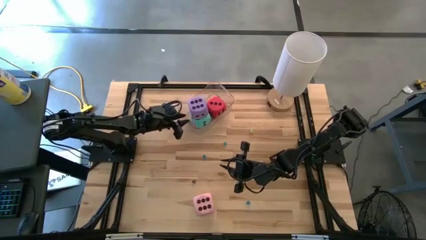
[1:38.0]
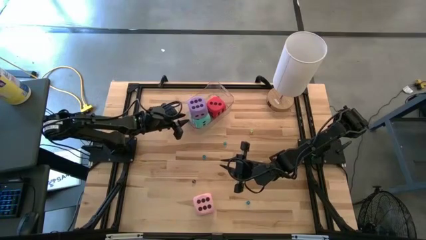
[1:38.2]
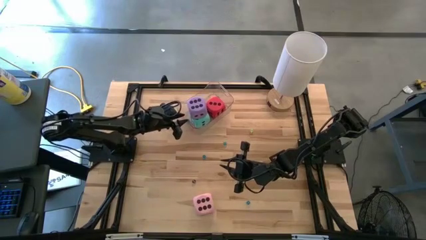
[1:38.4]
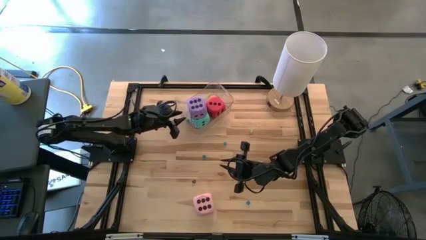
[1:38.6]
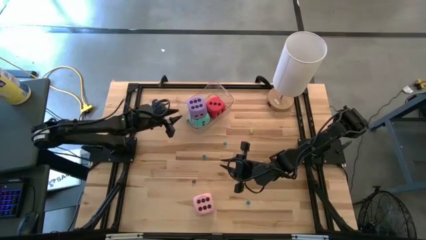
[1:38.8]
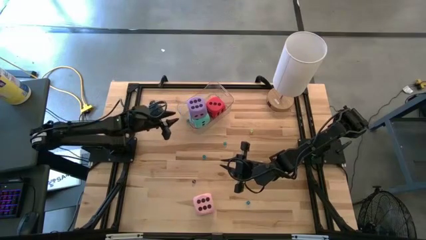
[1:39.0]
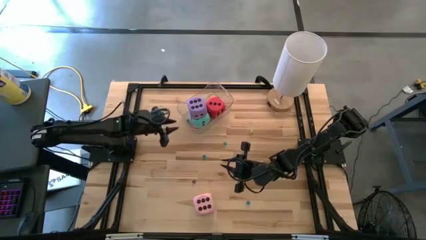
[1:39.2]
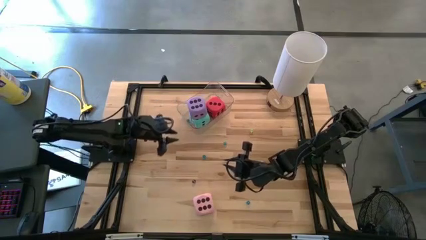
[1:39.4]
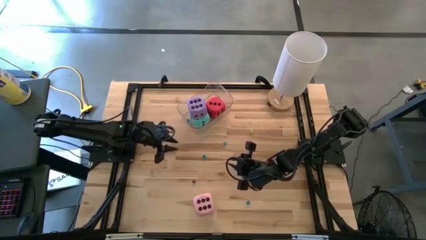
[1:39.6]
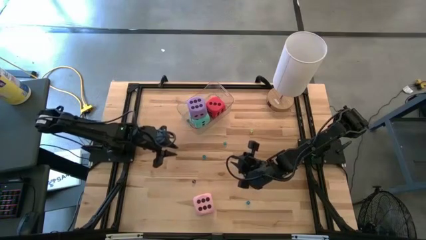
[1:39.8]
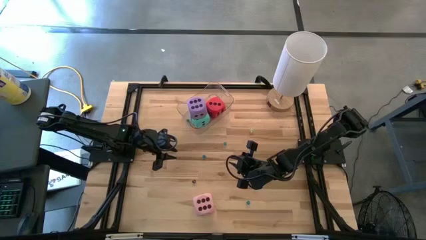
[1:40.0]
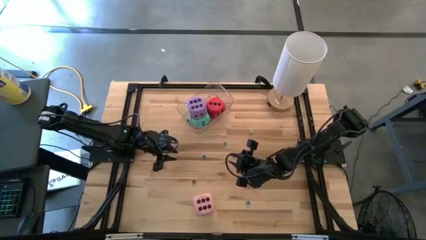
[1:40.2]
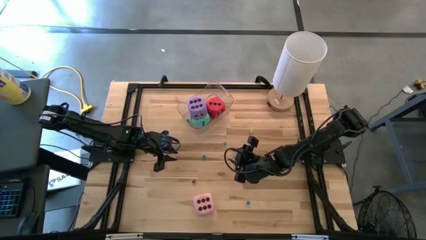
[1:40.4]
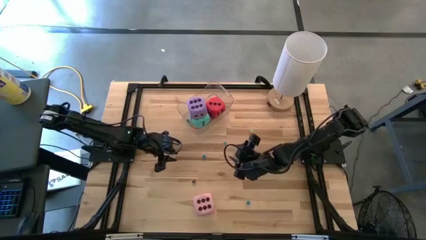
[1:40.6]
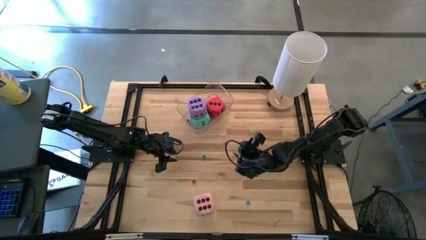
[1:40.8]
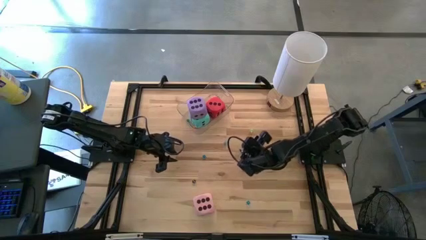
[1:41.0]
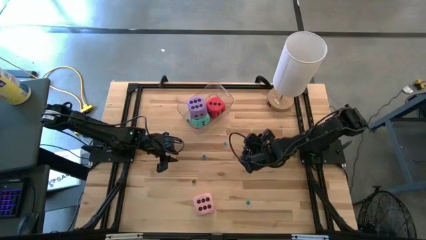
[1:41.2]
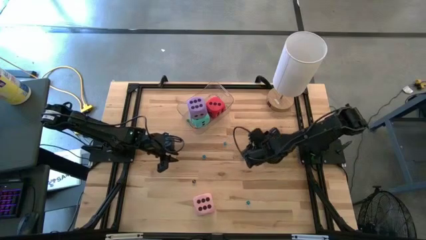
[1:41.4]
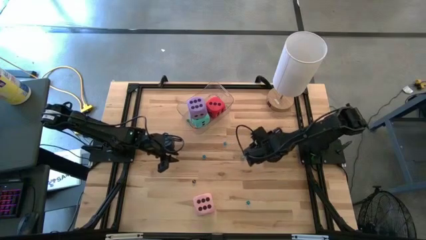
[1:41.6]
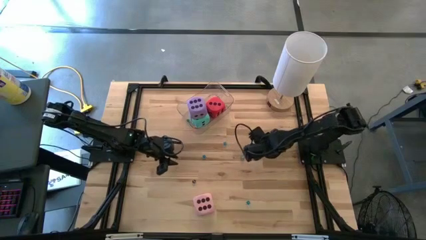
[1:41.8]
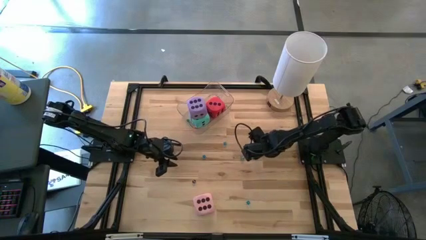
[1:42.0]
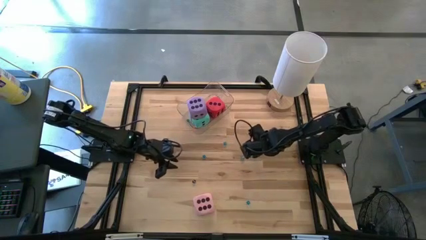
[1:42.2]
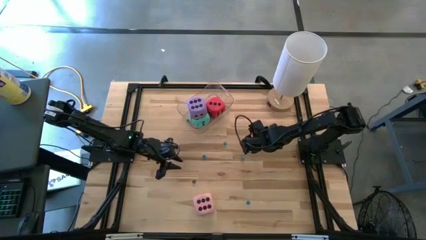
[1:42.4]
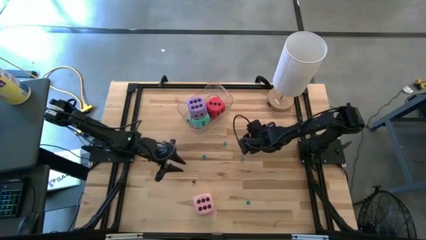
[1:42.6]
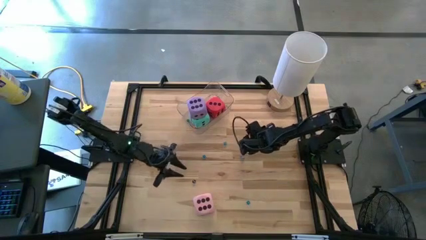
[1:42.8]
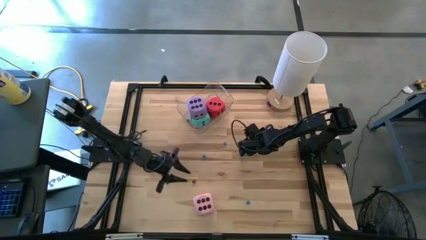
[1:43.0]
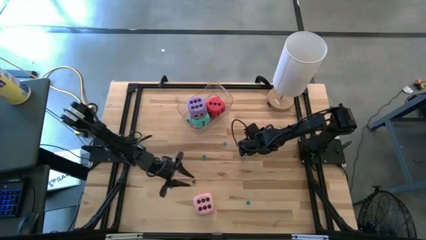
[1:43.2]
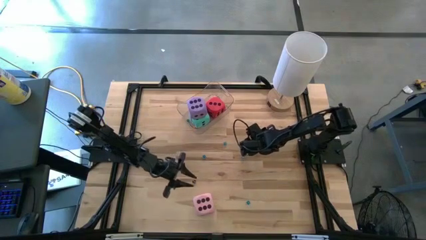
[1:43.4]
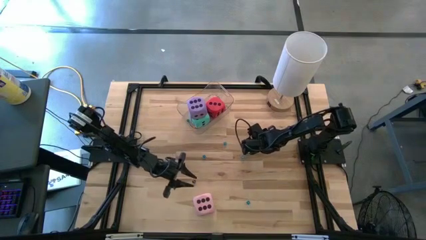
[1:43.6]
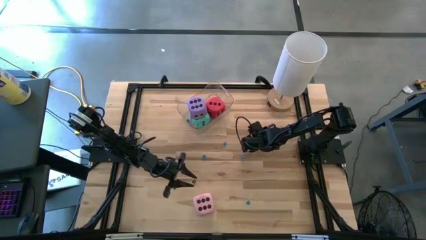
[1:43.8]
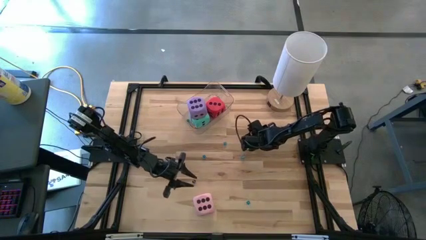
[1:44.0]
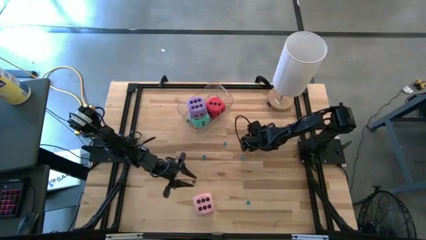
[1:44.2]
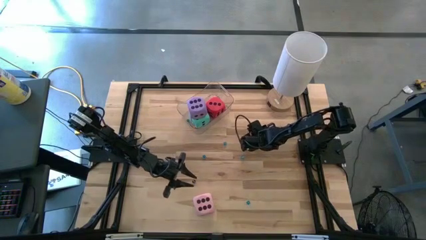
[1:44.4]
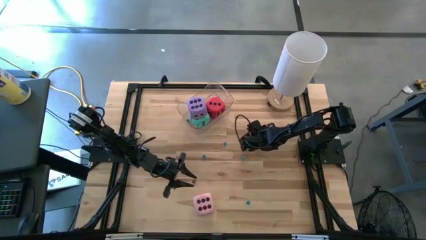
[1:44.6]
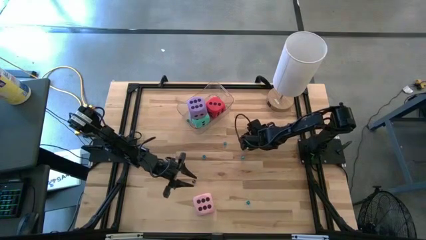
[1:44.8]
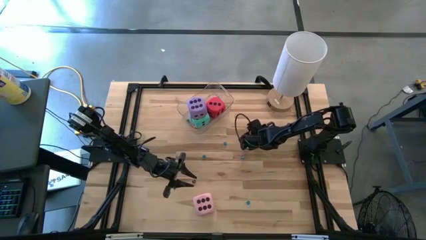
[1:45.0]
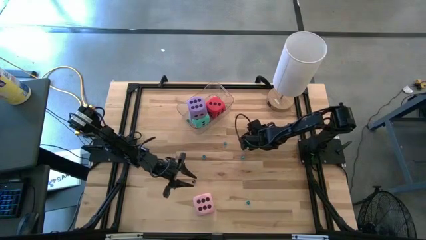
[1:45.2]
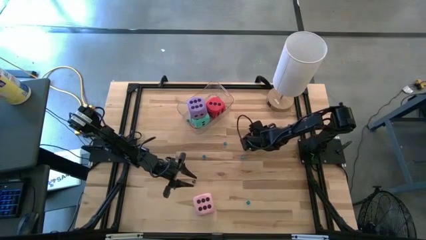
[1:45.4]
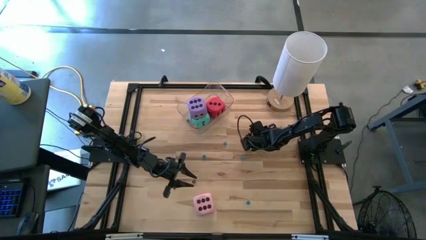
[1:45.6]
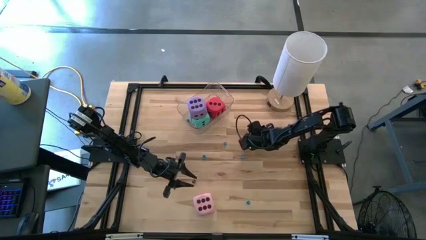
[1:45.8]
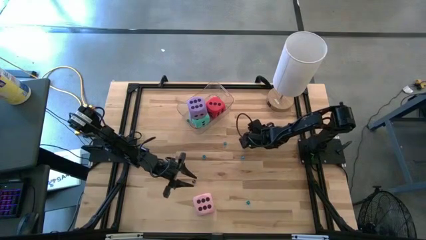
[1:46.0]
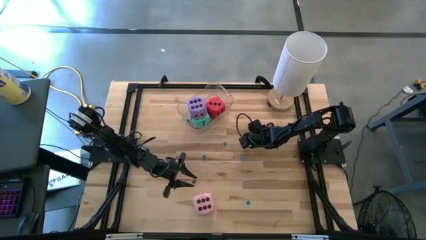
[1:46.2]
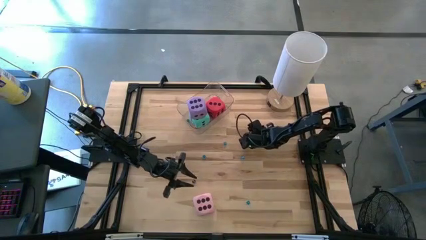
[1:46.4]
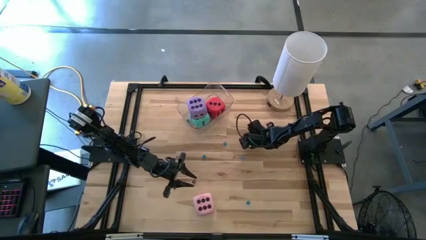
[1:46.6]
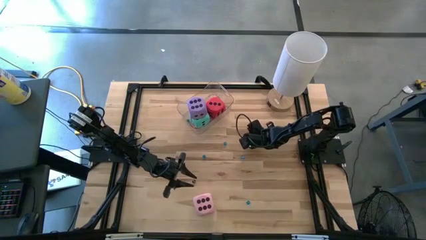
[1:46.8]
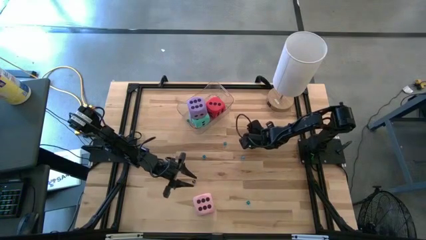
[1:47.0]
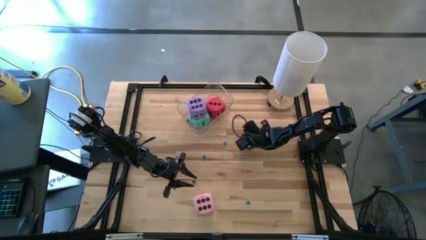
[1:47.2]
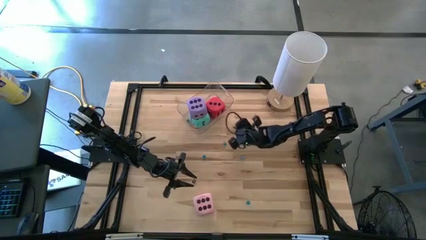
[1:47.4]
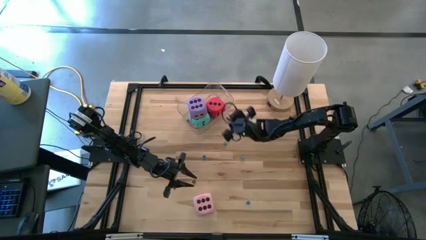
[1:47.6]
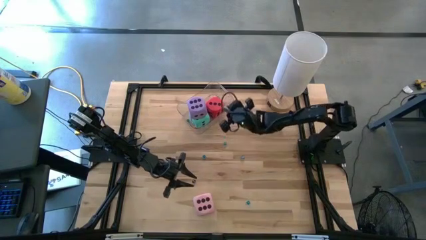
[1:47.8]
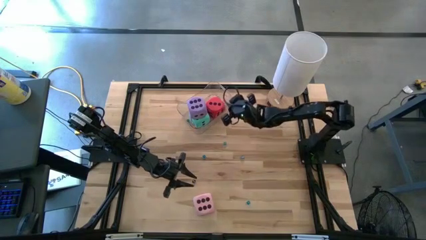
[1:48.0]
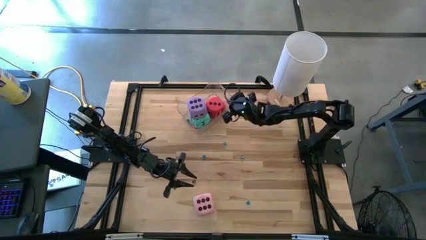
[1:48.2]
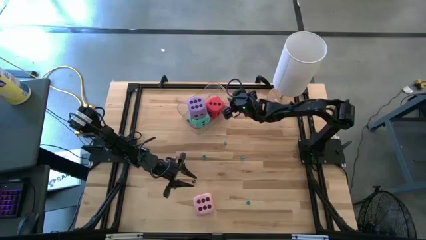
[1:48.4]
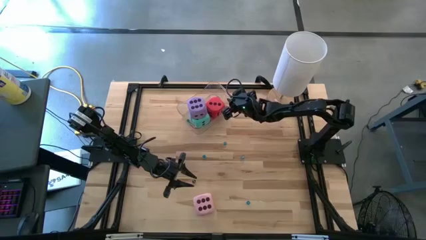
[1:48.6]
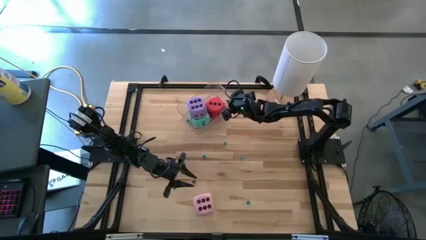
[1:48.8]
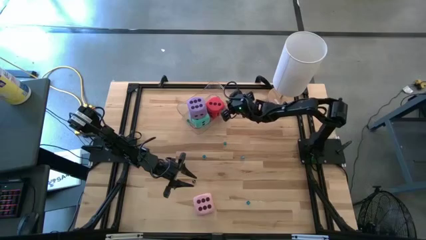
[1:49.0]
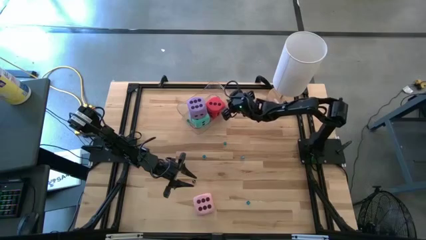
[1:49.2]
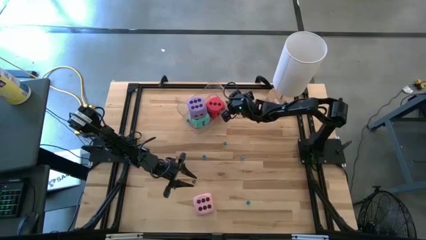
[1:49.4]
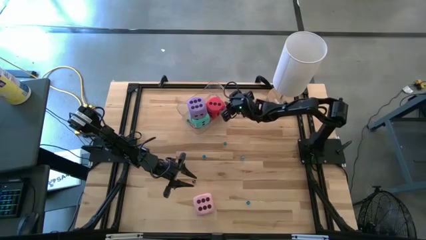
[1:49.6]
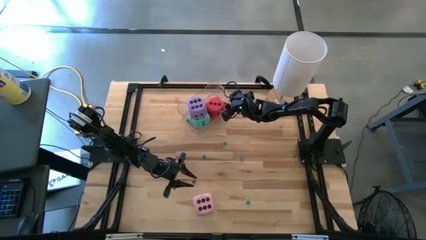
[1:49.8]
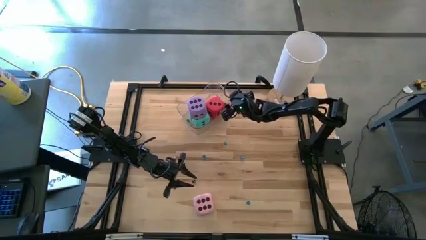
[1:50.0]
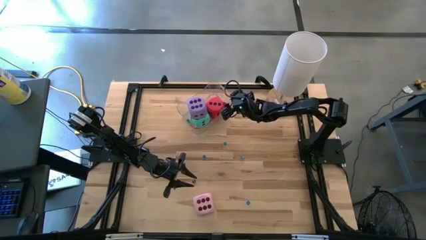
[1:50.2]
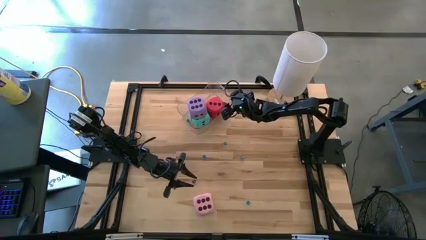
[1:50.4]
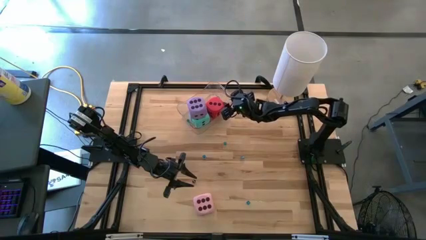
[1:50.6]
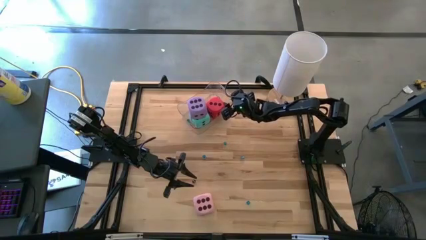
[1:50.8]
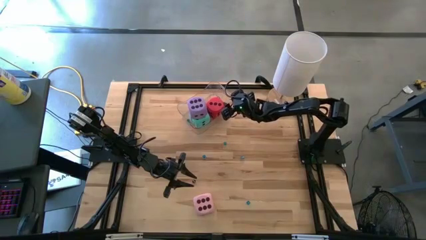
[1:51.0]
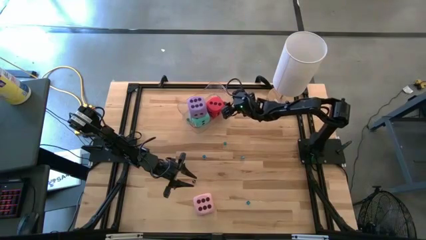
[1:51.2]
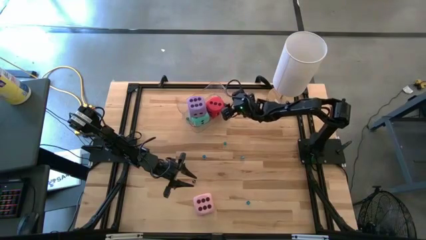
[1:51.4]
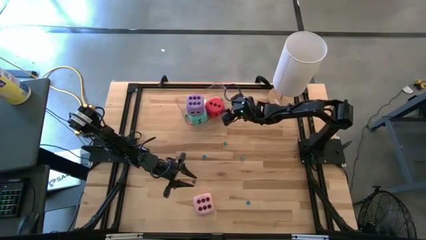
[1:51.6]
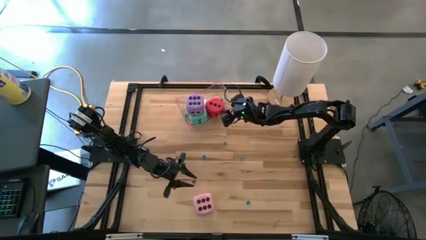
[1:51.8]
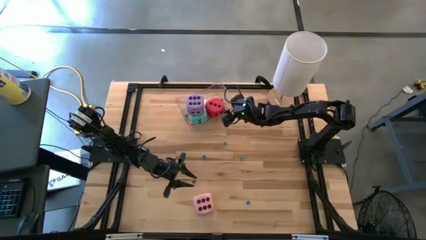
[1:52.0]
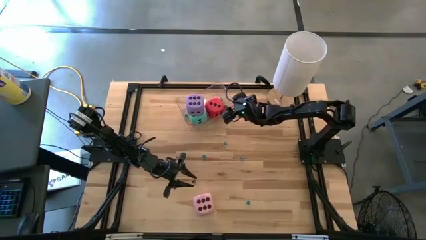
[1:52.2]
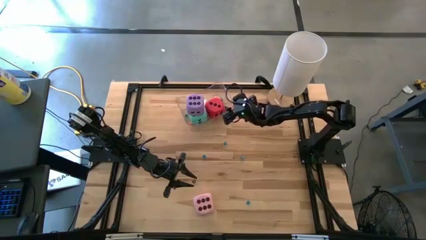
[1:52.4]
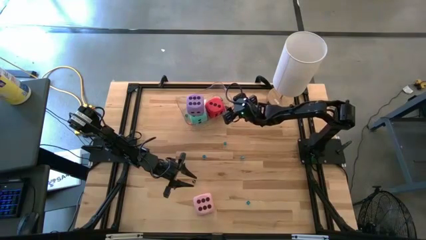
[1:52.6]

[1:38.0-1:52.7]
Task: Pick & Place Dice
Put the small light green dice in the transparent bin

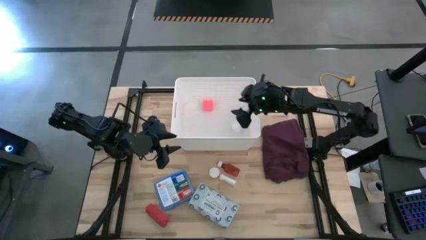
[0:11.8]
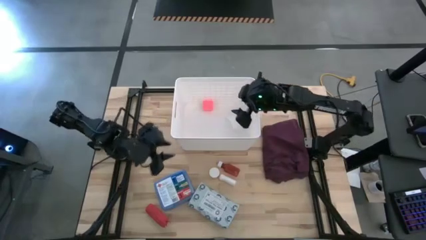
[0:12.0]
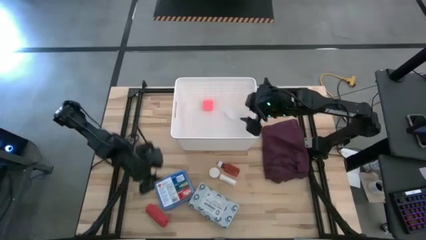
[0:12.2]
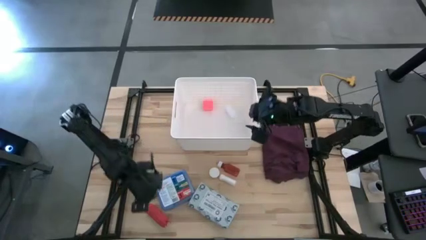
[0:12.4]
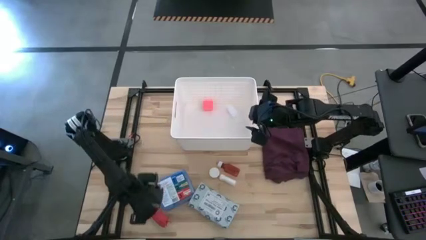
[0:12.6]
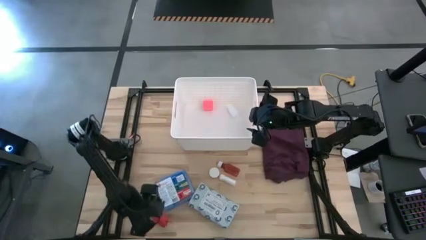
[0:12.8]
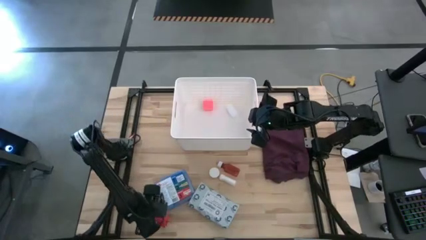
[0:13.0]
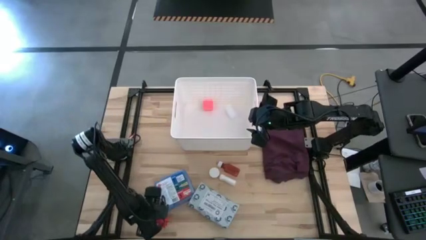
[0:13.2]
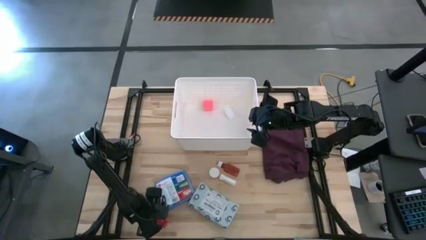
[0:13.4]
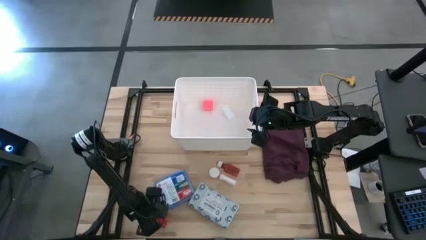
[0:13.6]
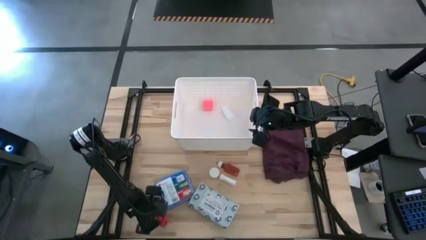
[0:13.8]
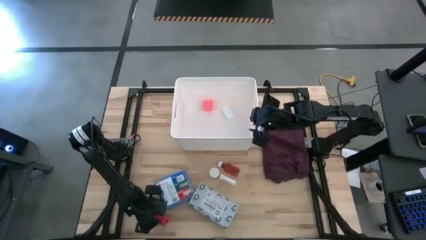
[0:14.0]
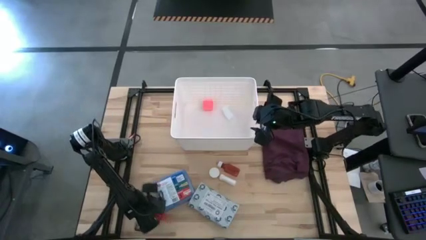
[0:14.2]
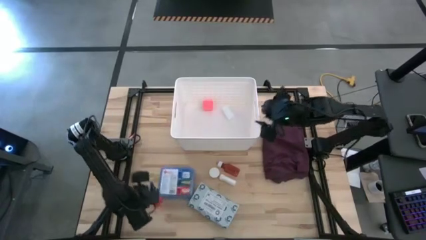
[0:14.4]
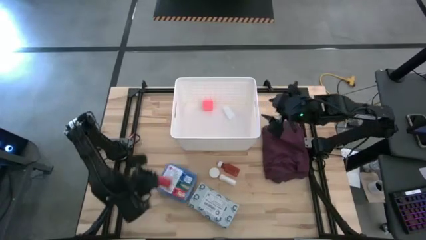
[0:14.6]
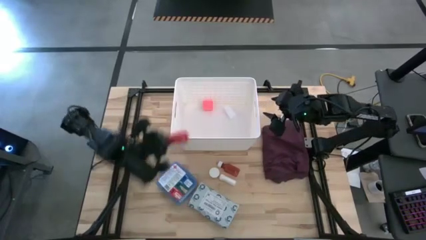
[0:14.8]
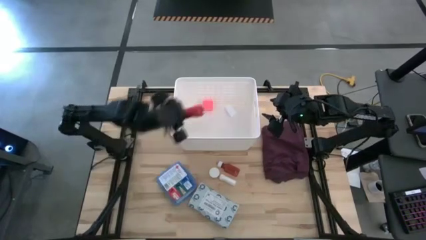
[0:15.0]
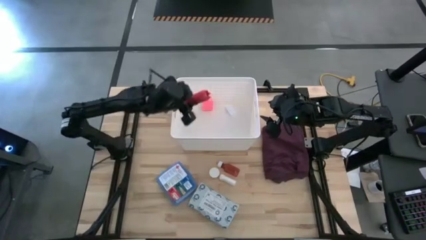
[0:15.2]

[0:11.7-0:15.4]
Task: Pick & place medical supplies in basket/bin
Put the red bandage into the white basket
